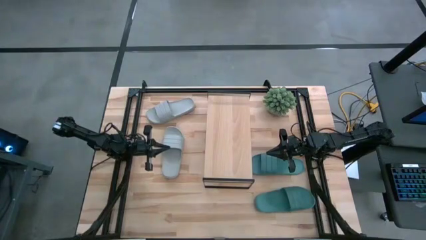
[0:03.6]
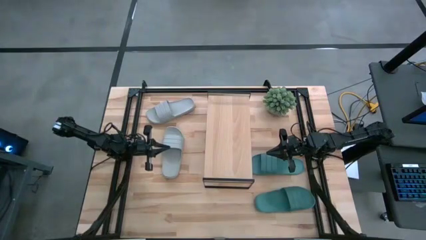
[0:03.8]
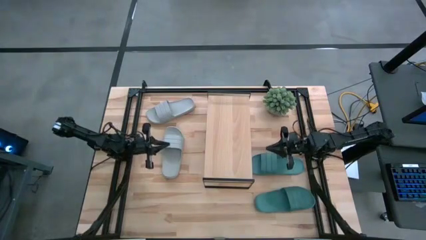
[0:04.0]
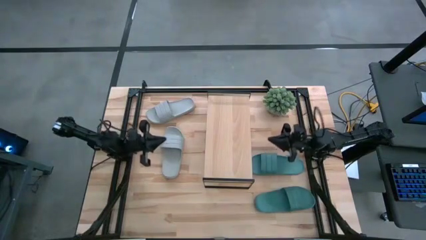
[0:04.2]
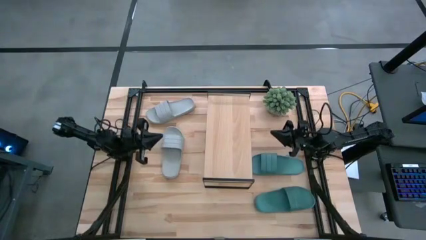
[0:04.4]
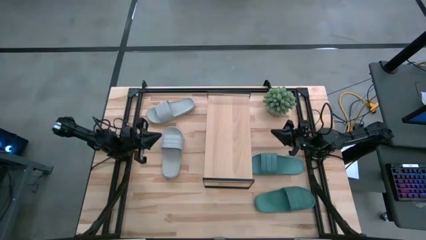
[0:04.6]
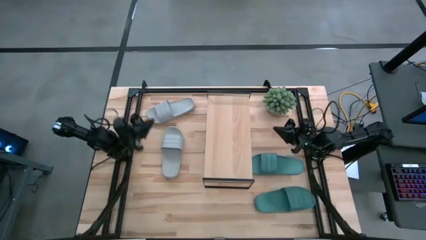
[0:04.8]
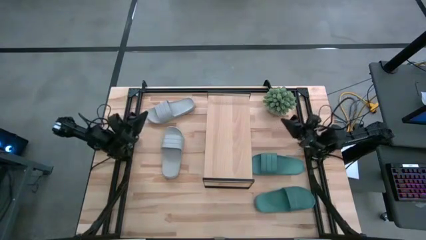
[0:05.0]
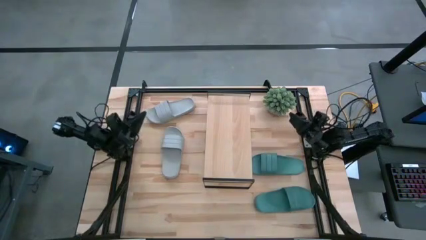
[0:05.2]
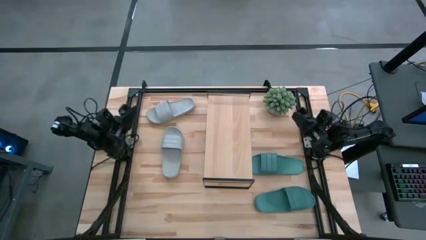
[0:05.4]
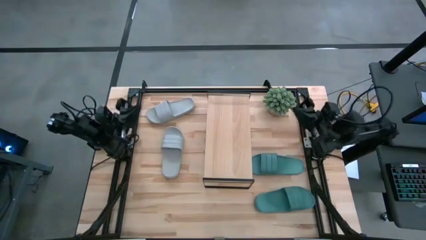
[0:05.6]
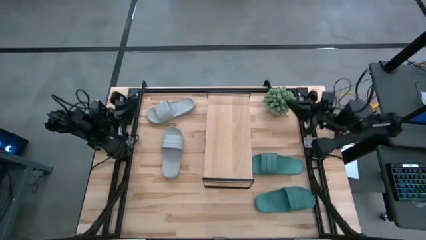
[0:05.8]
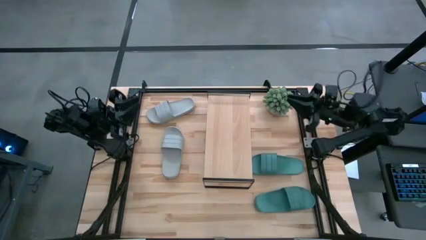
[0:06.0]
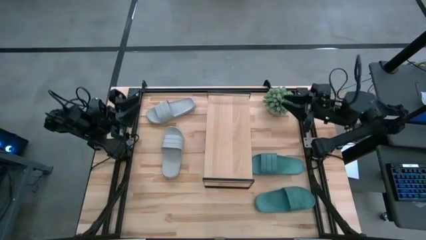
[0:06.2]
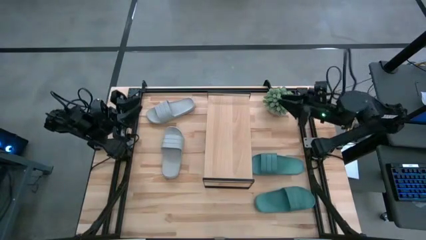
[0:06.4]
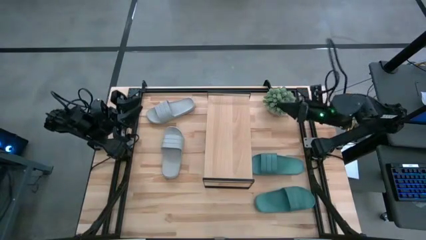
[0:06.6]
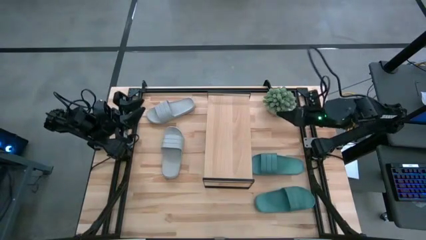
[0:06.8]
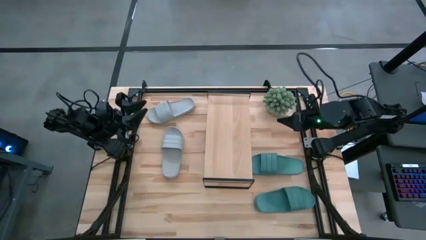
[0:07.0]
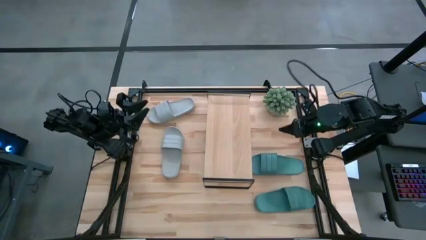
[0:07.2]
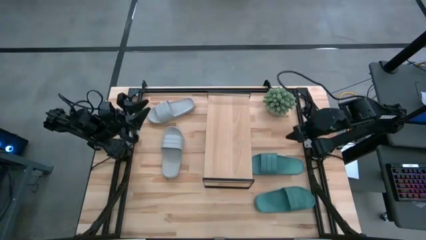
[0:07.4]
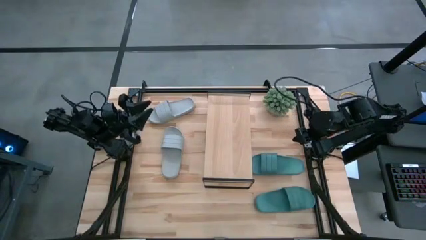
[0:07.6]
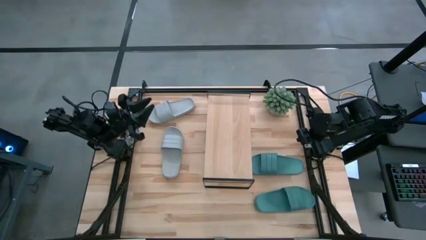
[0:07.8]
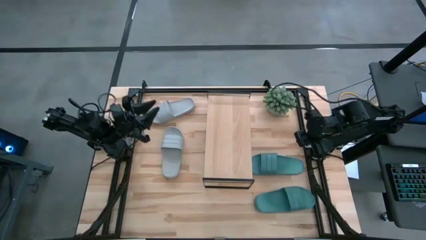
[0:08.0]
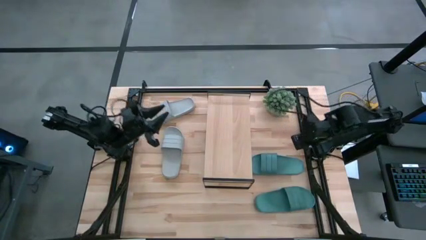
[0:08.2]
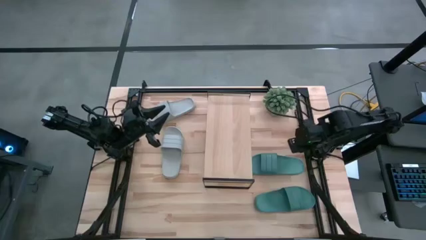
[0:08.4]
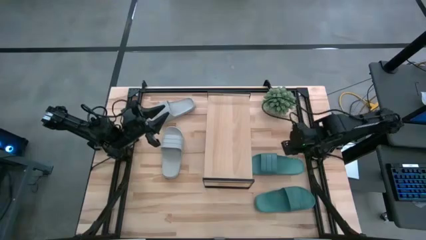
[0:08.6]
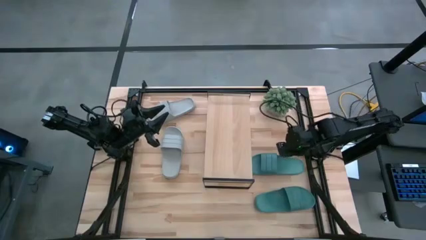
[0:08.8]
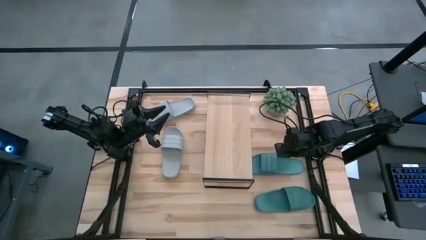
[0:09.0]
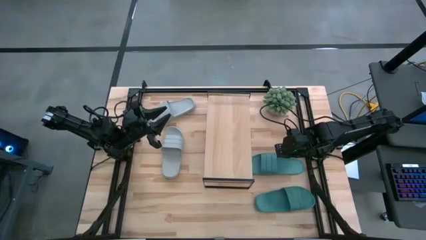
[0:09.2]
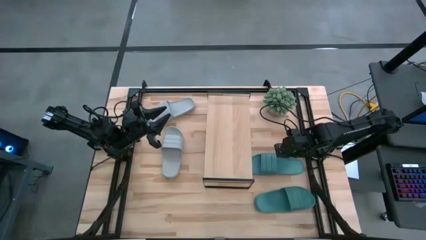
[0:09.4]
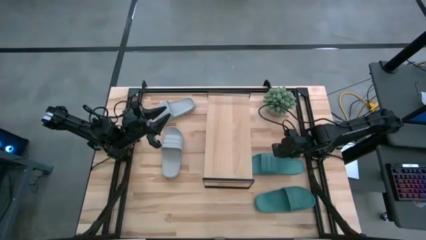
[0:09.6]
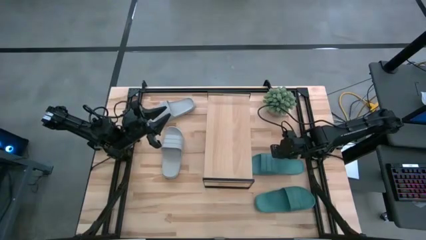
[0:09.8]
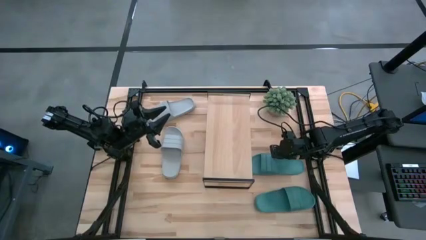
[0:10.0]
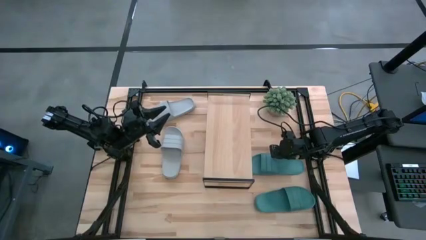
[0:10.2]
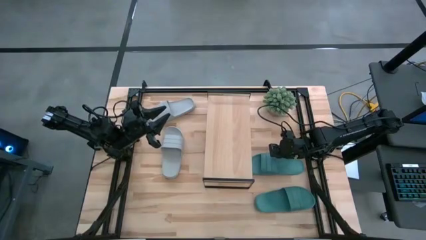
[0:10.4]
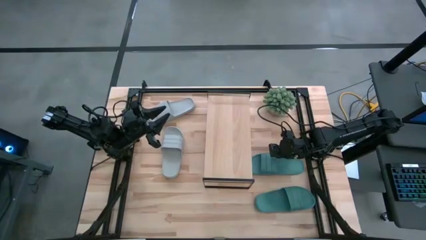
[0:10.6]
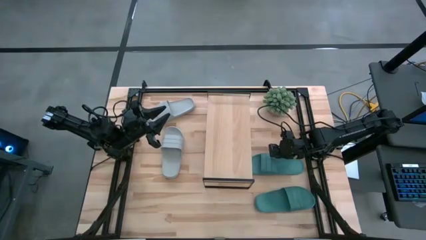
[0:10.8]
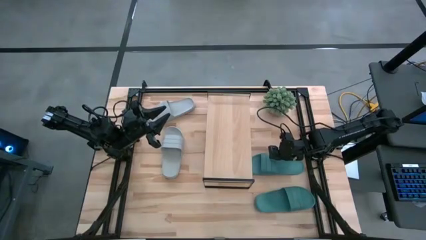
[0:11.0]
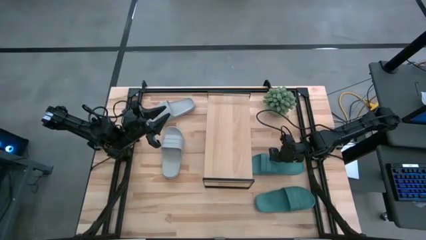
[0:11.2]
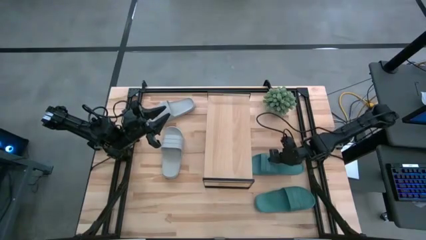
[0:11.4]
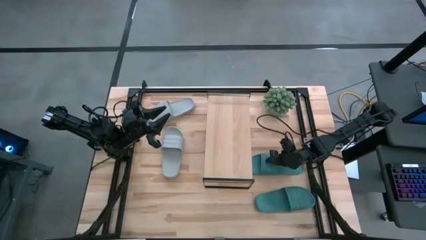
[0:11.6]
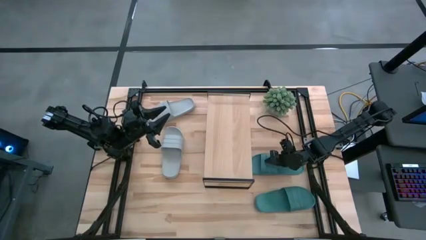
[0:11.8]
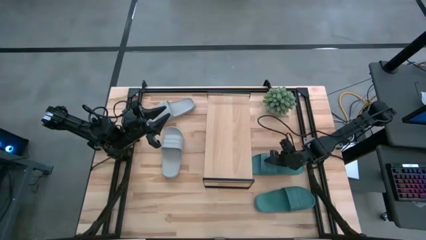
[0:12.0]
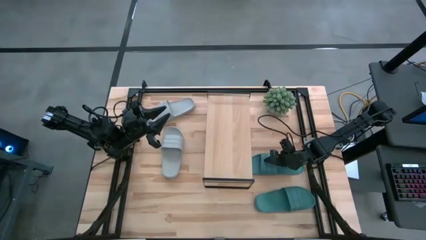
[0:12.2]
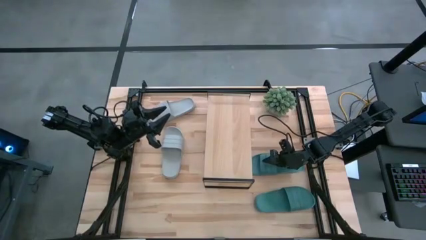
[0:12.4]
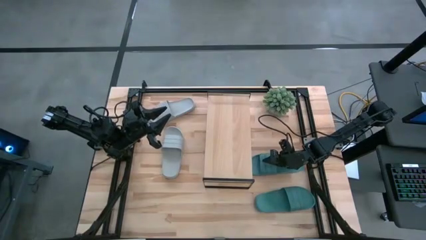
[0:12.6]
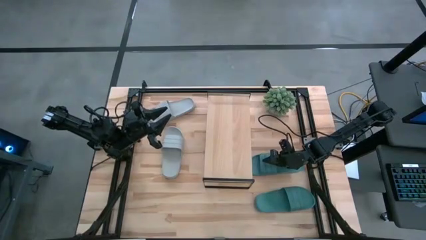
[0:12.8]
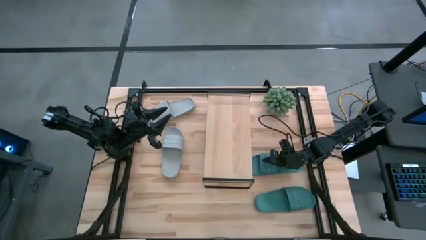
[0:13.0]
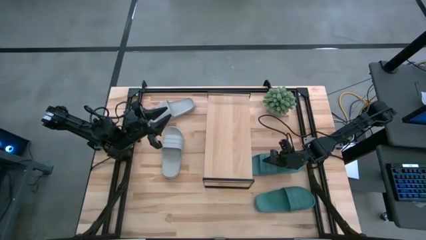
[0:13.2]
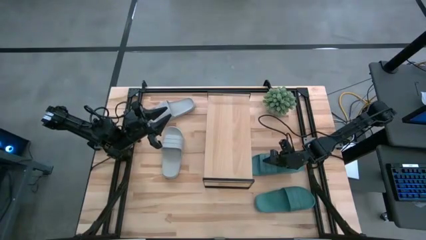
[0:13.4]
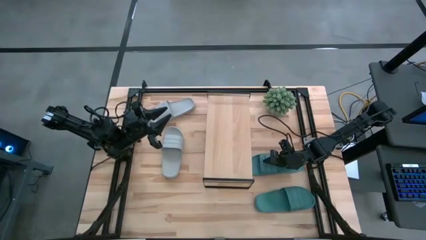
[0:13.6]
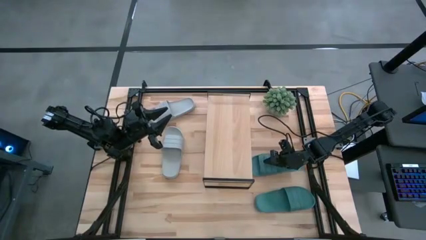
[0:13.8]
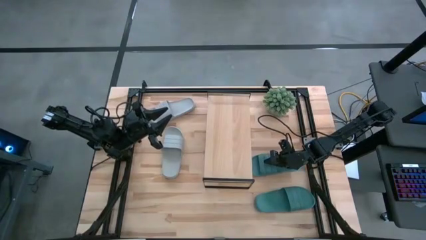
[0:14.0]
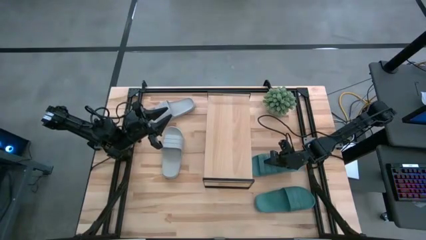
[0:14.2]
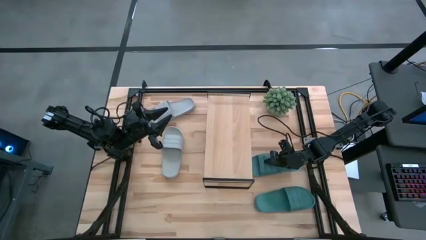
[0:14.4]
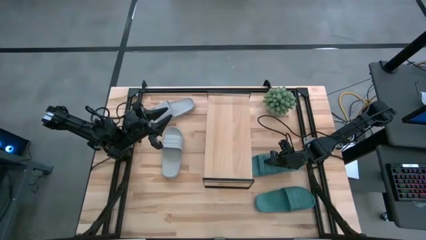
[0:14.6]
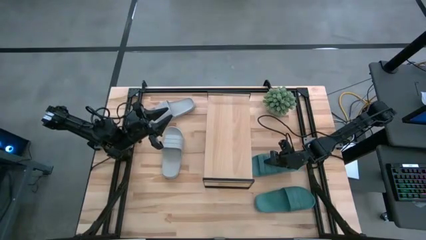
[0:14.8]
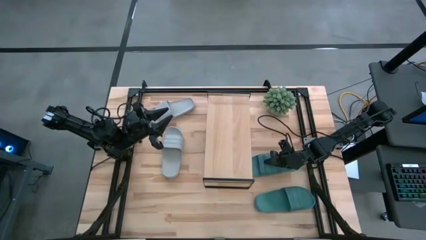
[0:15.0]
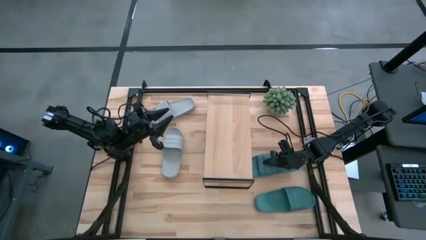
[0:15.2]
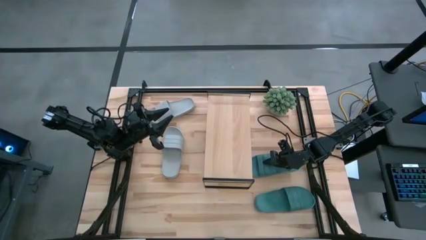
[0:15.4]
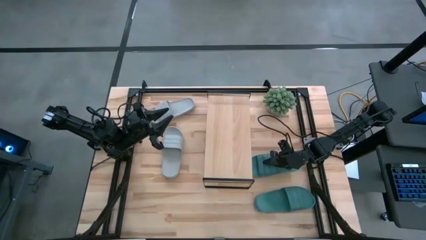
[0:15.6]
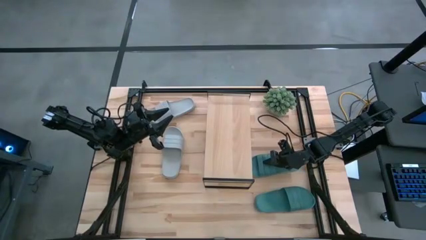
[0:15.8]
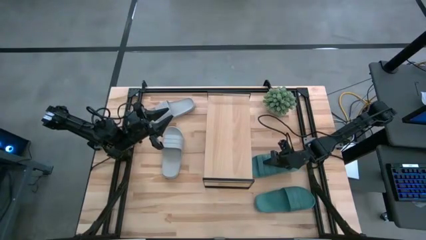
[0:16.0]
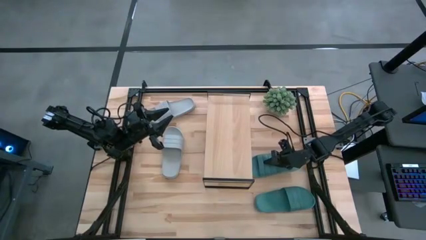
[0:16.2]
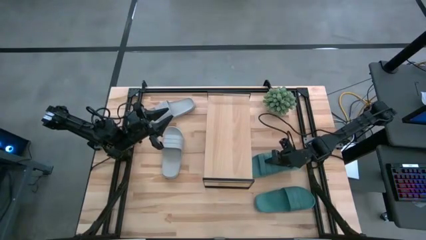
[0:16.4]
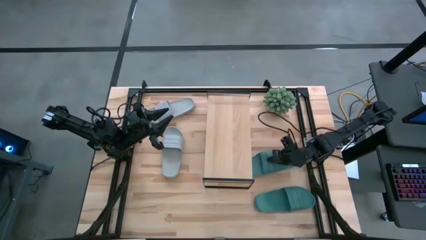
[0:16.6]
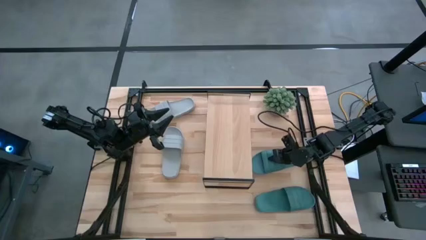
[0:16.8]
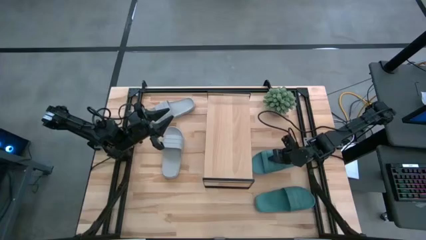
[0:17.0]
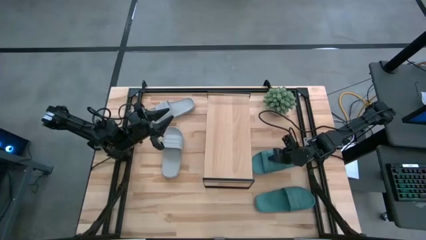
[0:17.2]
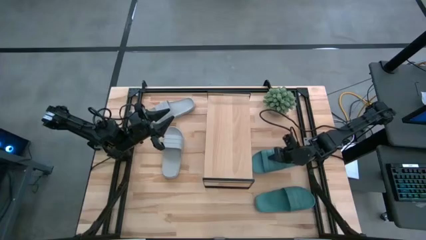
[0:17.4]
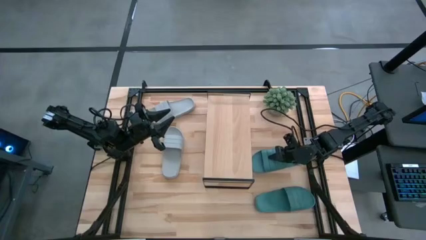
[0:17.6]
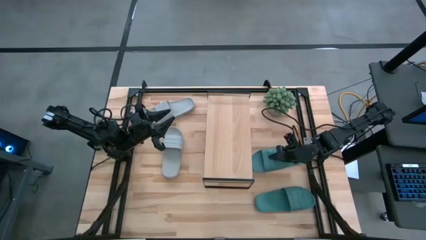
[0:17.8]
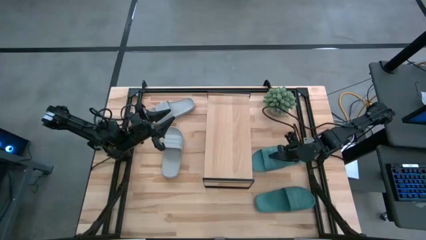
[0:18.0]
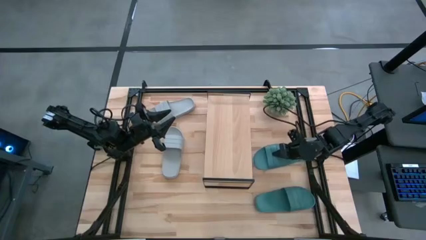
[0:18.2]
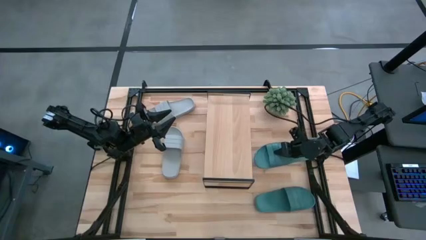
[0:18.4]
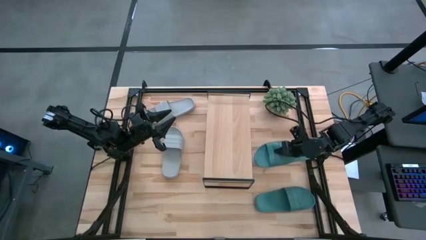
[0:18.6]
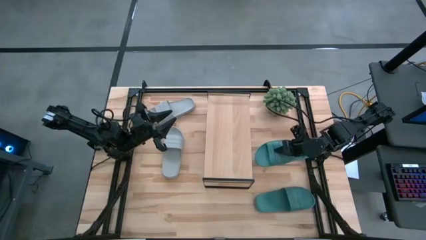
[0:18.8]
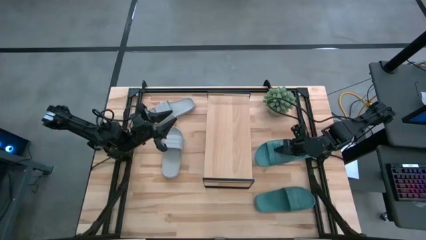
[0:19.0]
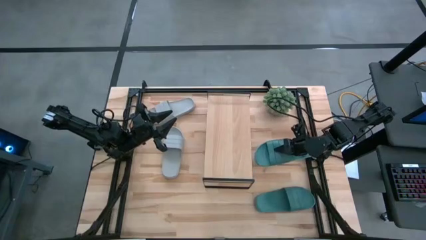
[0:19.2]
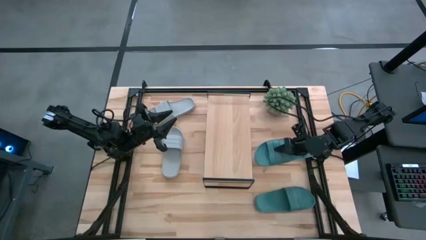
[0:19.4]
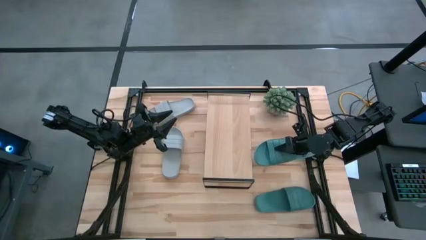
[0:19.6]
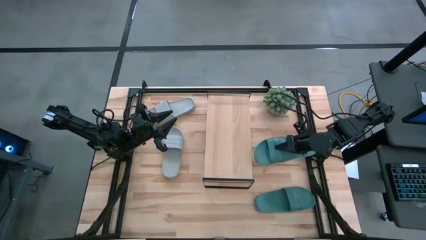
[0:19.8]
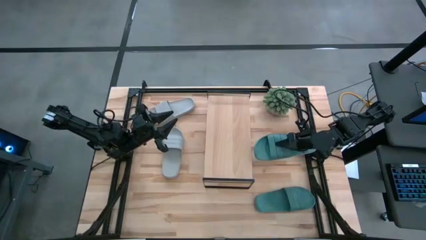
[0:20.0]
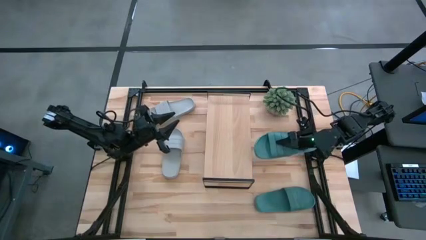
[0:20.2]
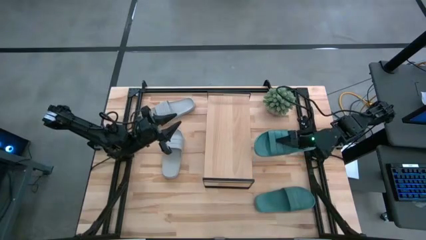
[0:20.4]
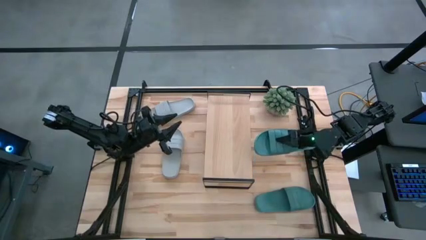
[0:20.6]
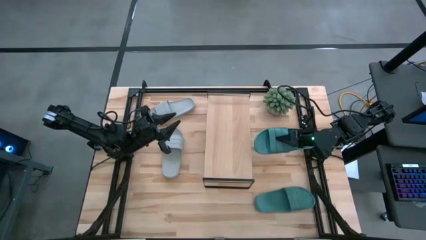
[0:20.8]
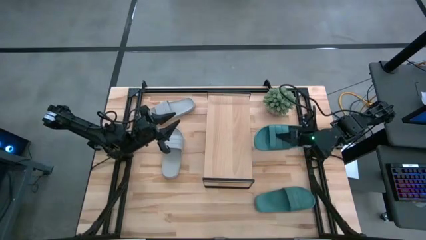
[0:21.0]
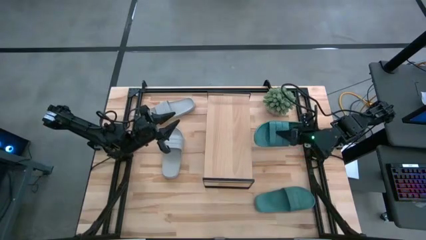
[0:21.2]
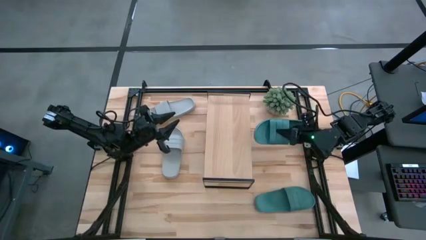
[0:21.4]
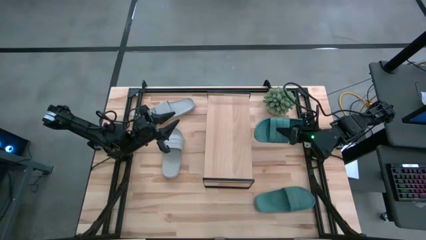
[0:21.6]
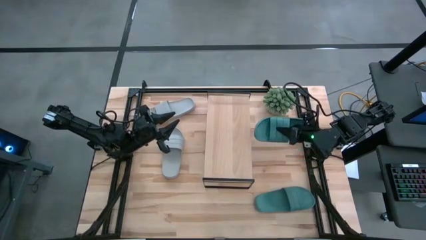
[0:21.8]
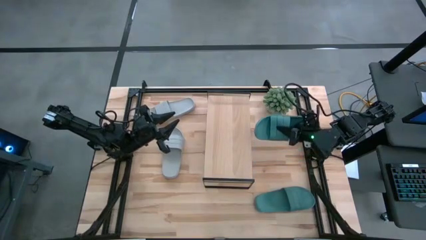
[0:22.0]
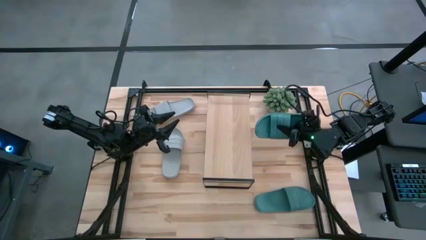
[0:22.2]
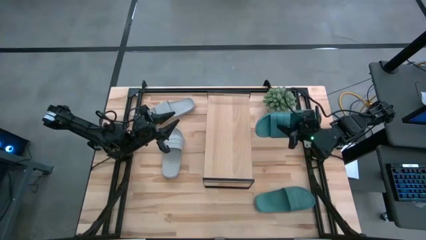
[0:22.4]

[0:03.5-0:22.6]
Task: Pick and place slides into the shelf
Put the top green slide on the shelf
